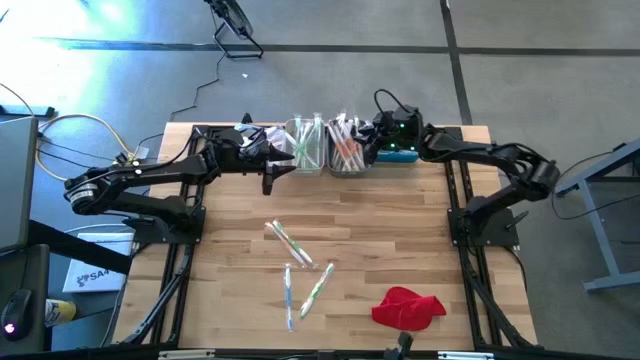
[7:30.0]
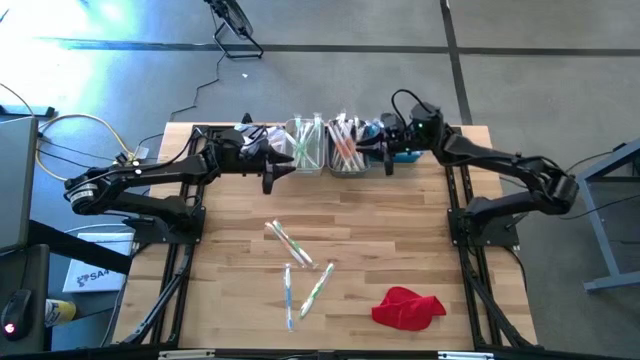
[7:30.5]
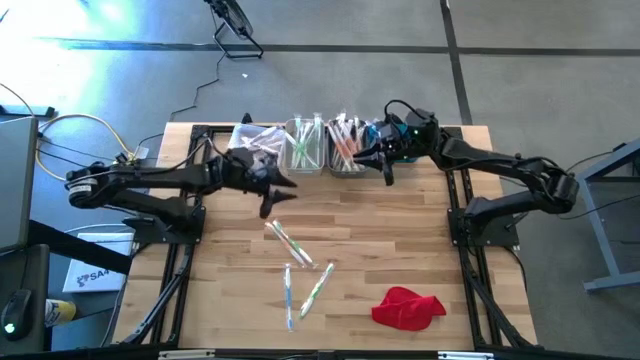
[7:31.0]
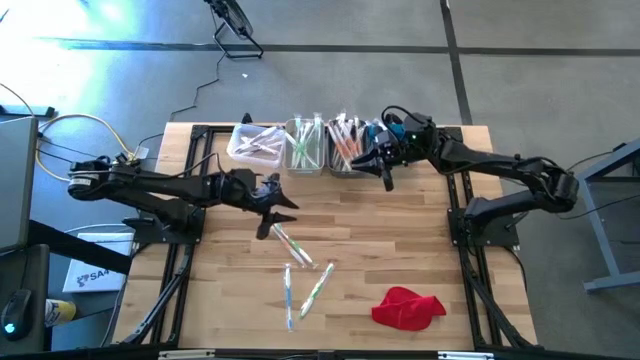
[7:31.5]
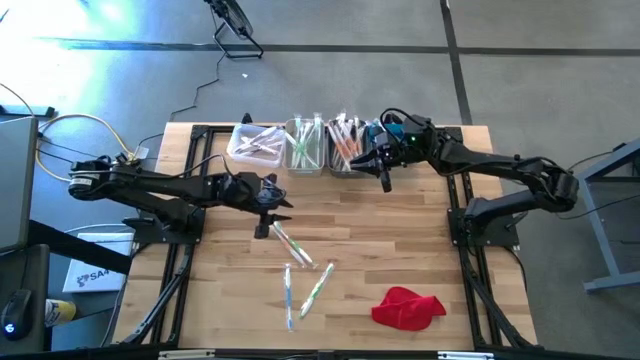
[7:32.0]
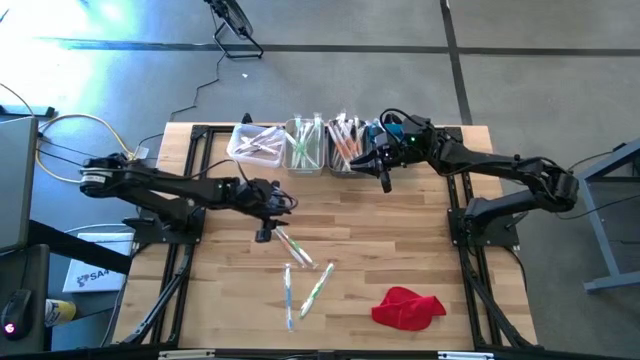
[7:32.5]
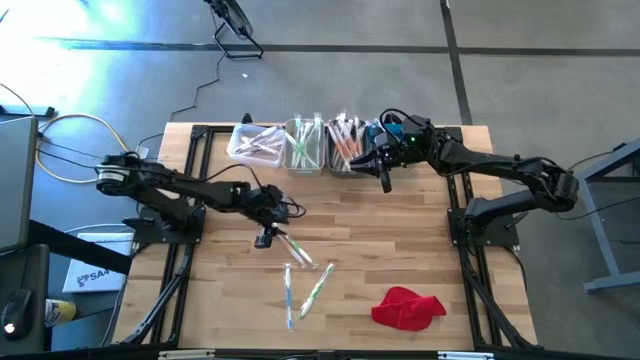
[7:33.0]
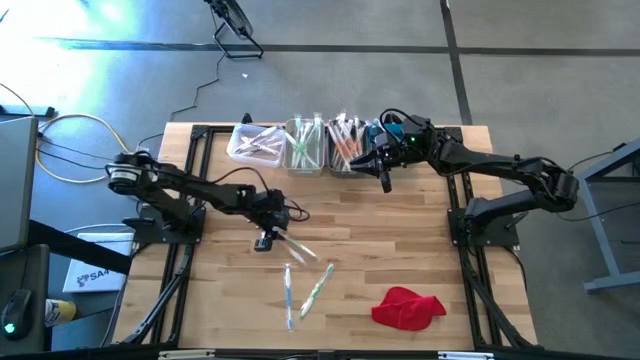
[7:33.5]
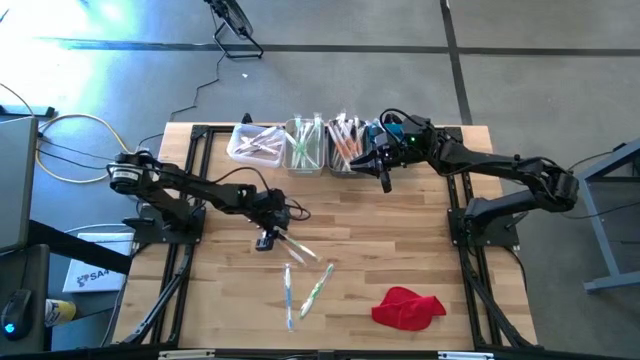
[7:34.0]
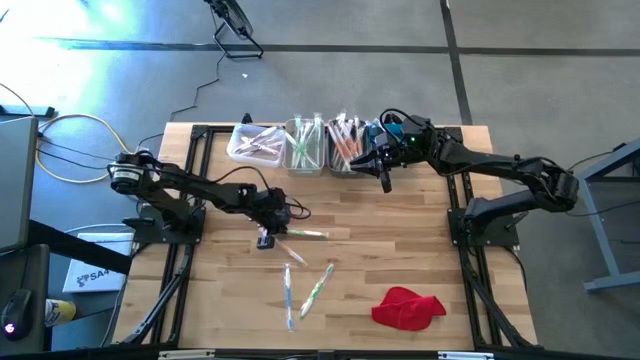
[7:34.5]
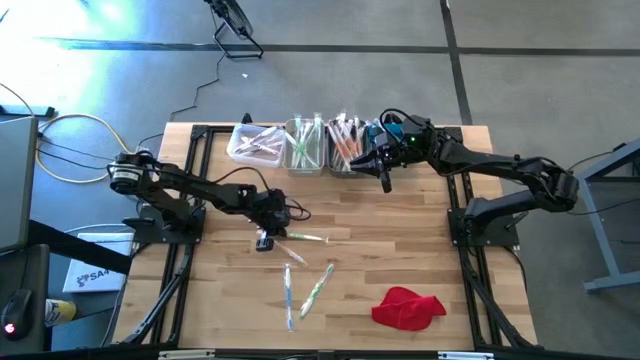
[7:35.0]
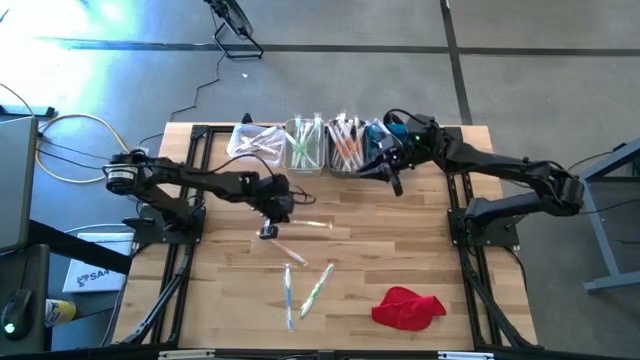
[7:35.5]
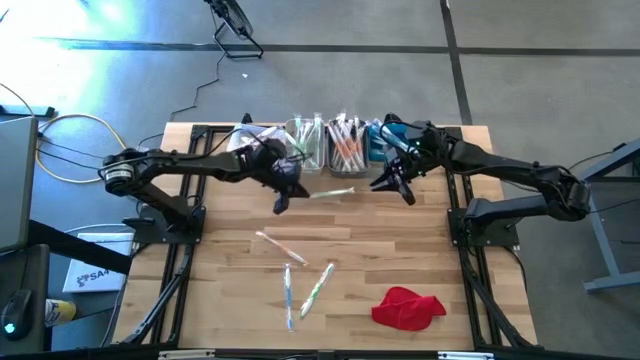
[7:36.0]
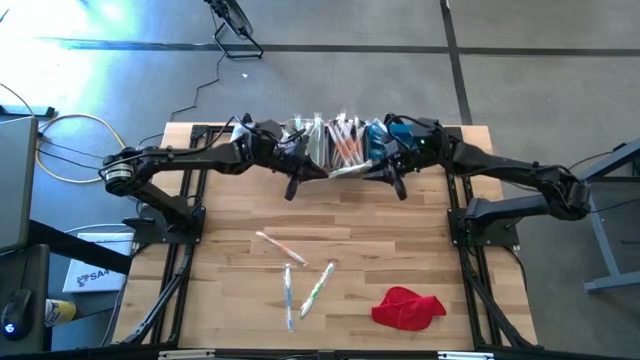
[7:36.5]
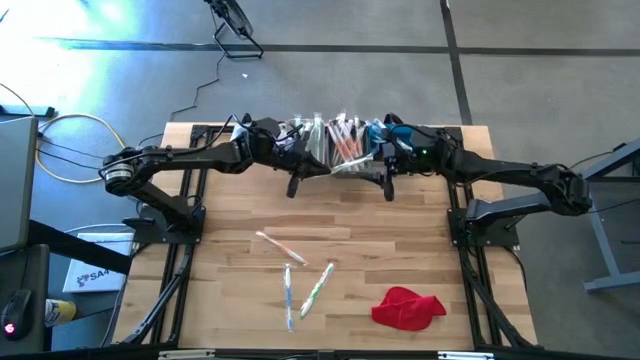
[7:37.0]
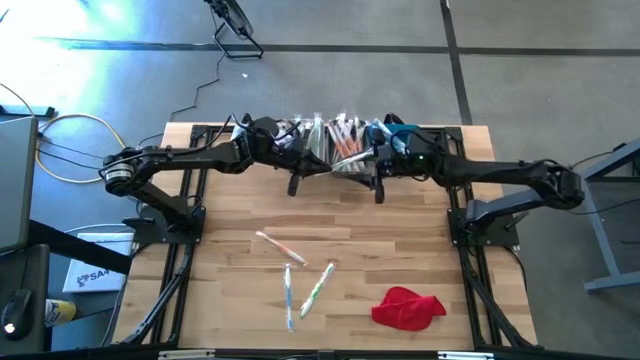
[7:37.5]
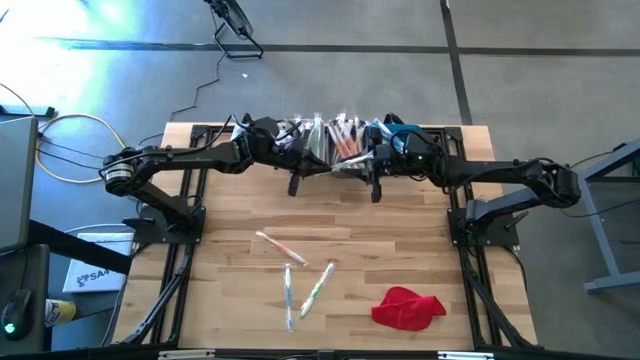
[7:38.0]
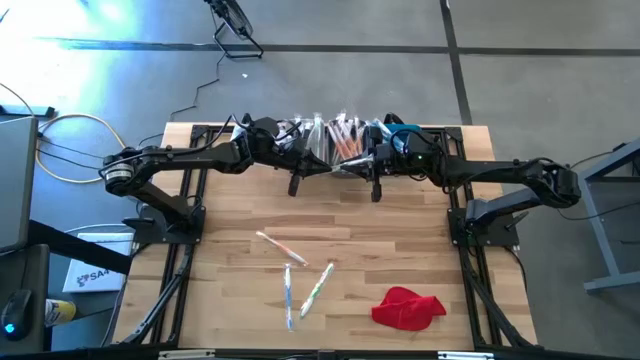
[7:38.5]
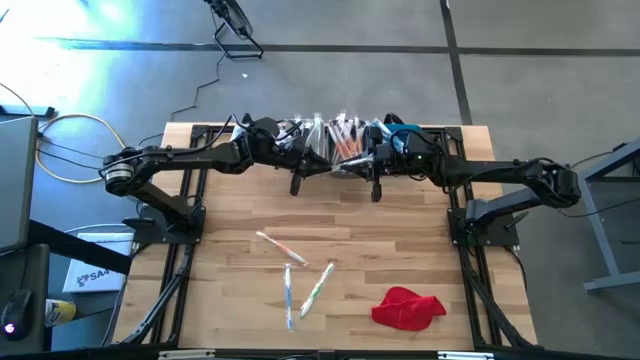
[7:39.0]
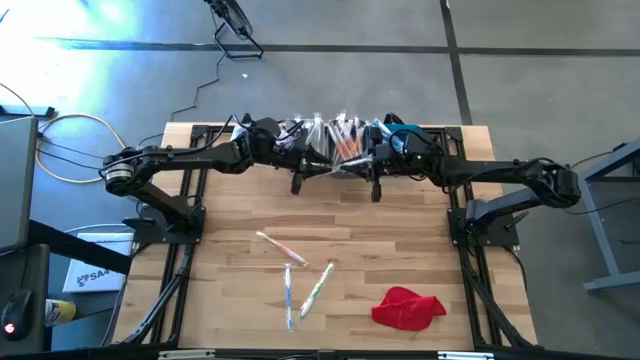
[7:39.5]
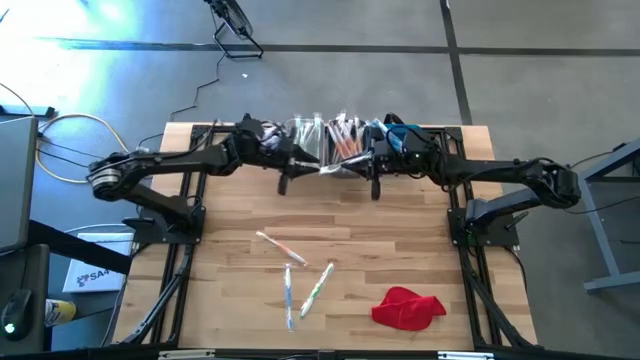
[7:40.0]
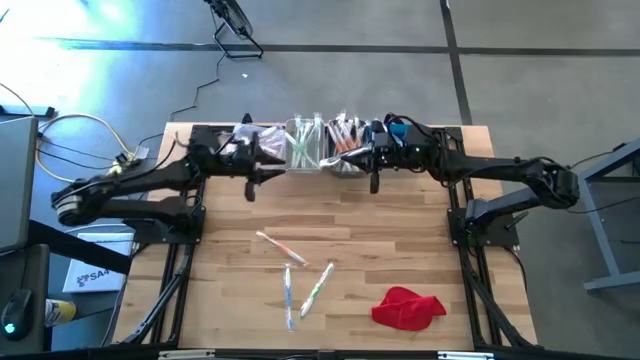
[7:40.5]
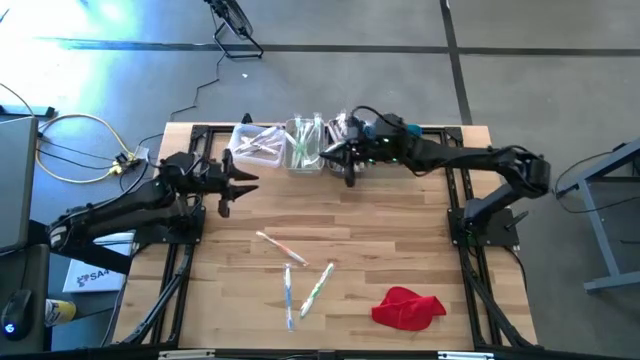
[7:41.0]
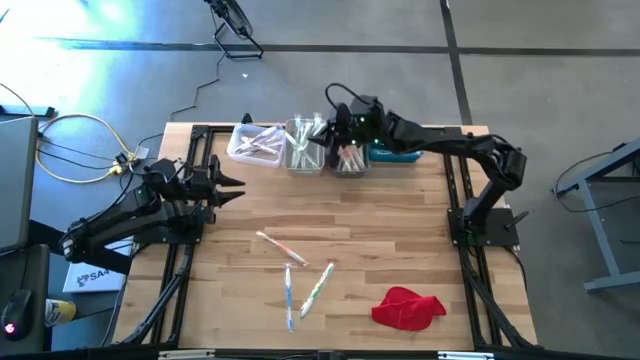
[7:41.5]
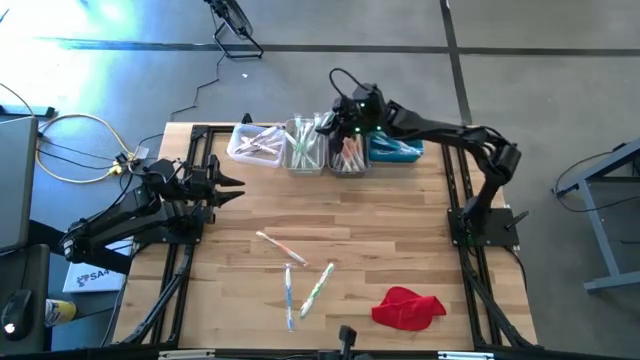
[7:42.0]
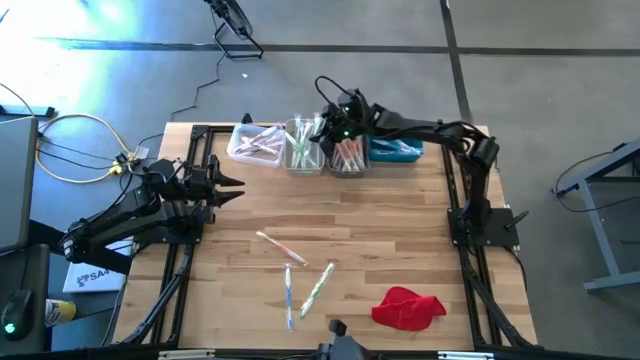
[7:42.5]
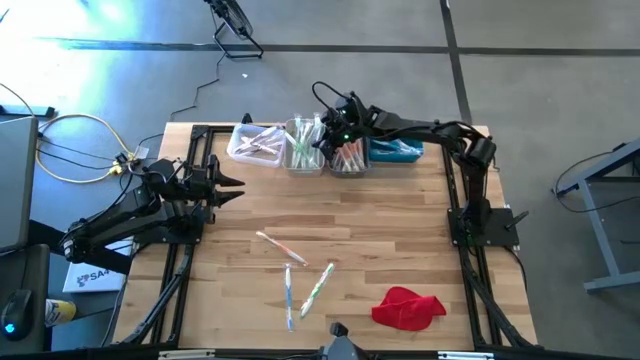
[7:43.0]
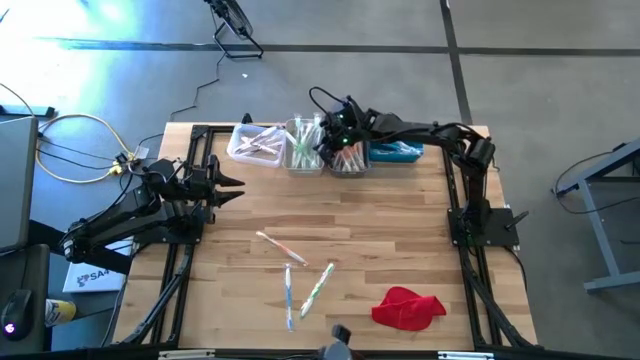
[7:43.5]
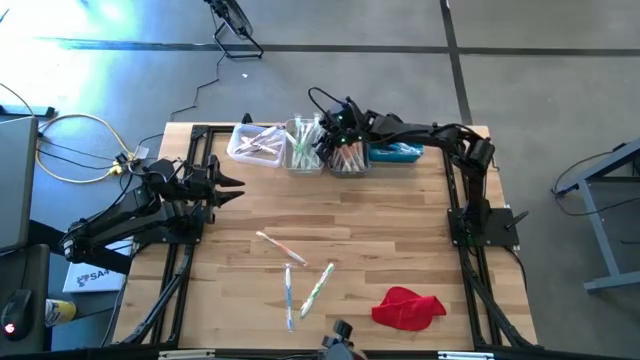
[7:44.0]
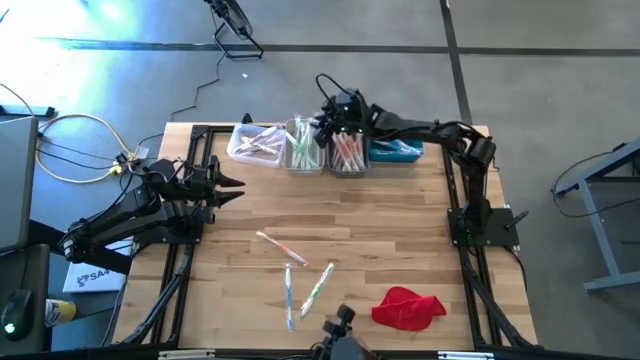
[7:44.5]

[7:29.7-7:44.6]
Task: Pick & Place Toothbrushes
Put the green toothbrush into the gray bin

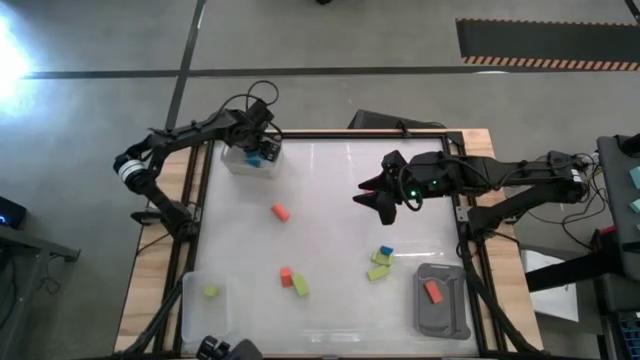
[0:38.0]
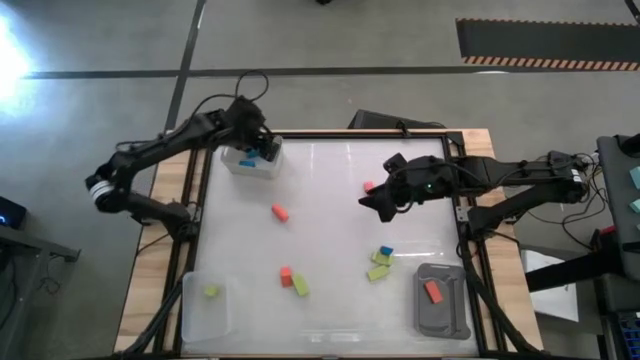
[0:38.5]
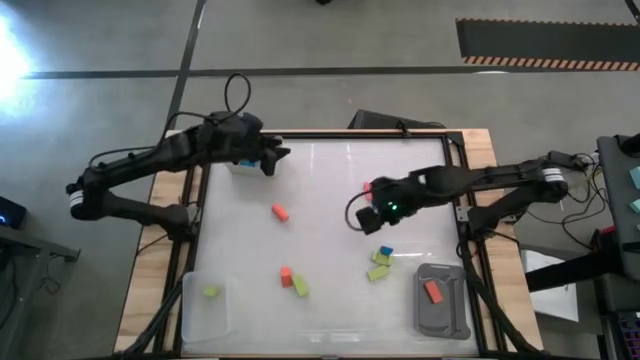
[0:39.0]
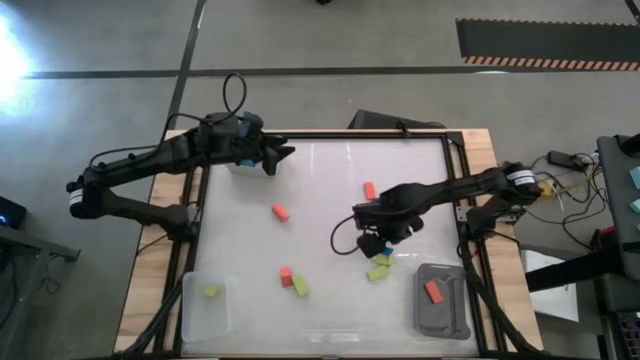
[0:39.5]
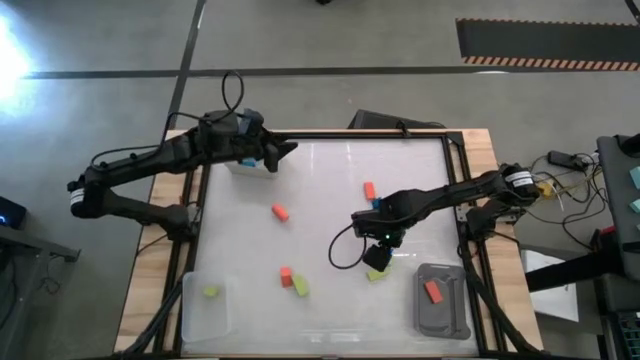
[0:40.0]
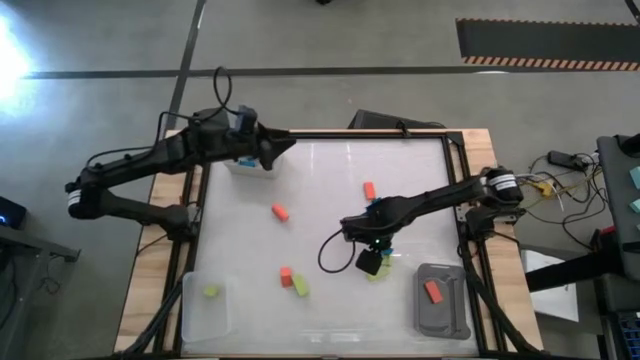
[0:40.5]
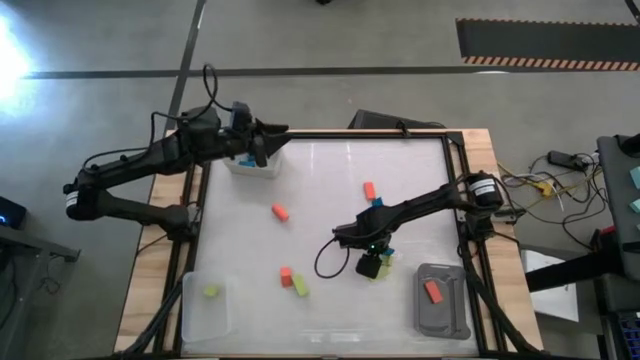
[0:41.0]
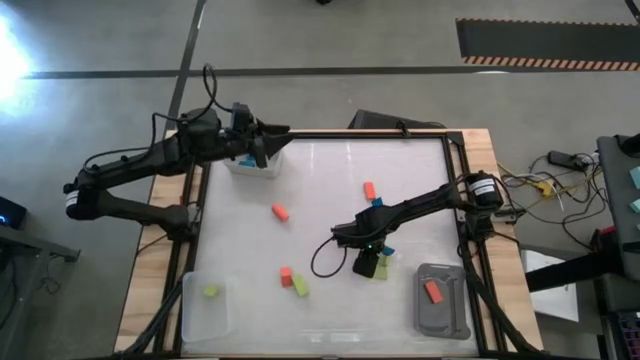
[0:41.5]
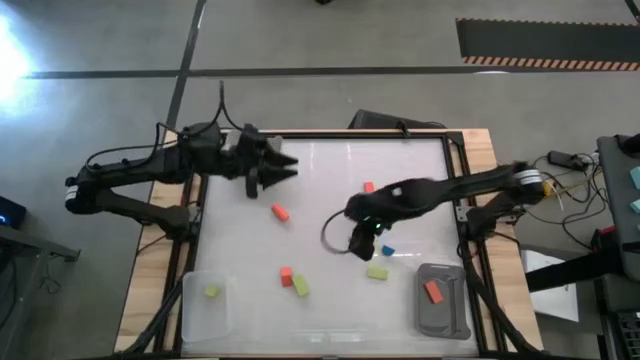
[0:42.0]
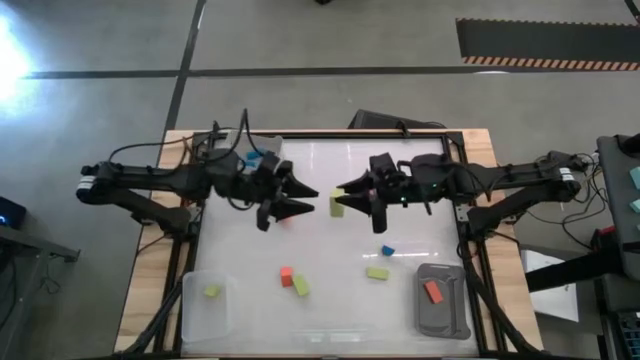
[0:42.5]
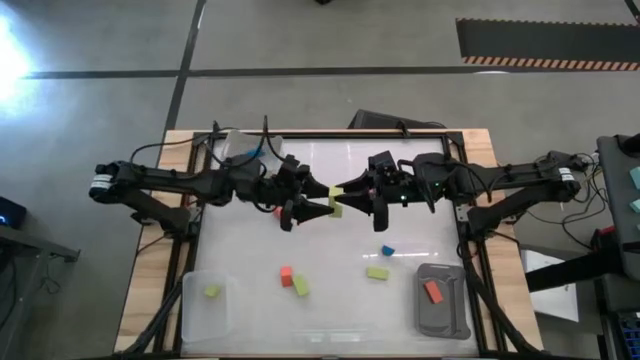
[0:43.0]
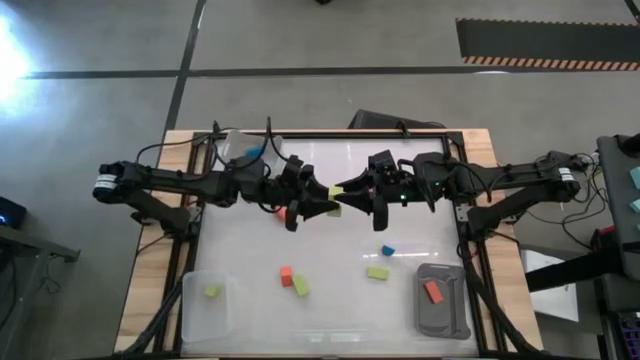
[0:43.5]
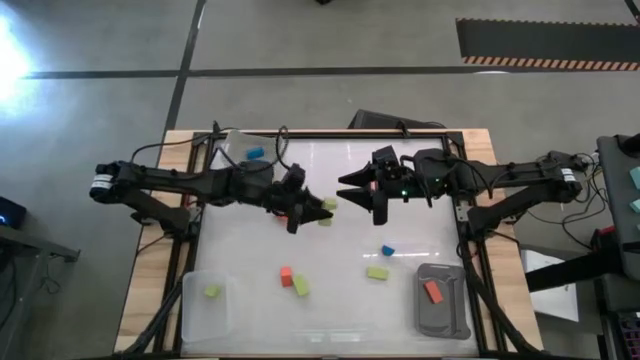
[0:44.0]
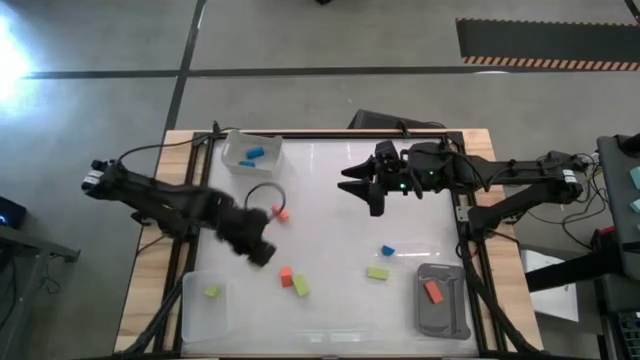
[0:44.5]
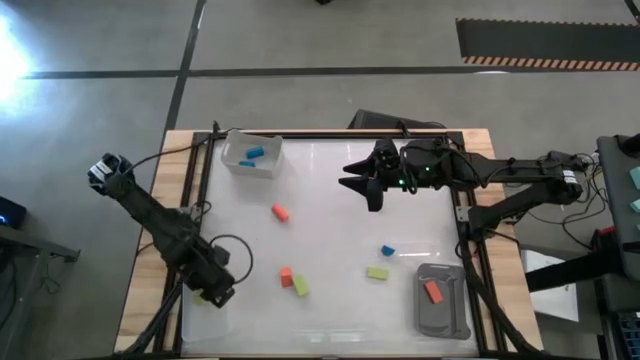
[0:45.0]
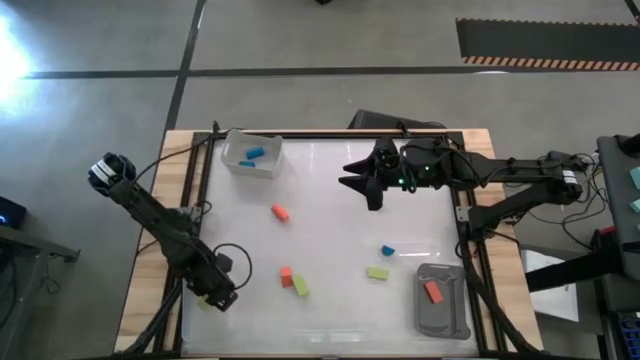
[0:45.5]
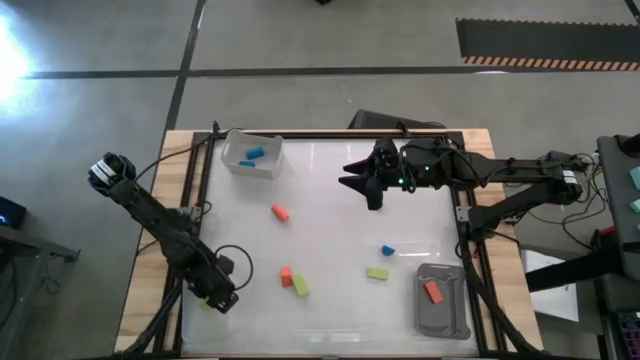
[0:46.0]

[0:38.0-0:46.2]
Task: Sort & place blocks by color
Put the green block into the transparent bin
